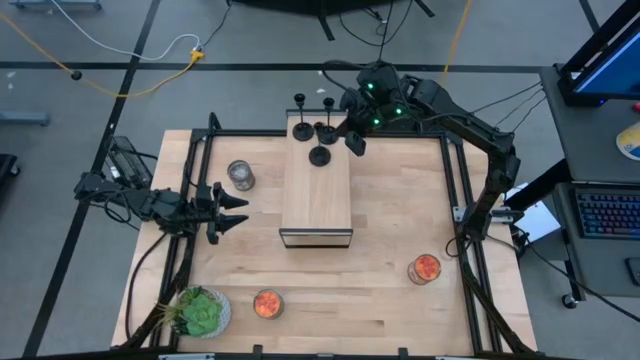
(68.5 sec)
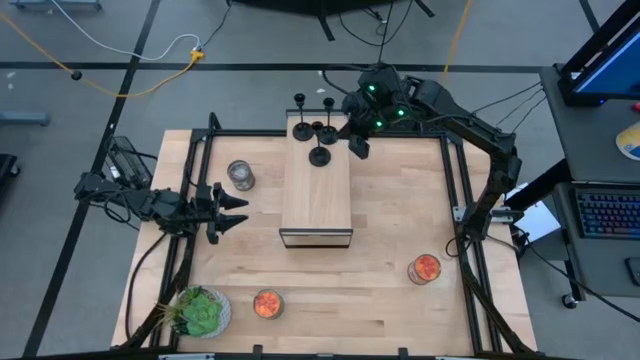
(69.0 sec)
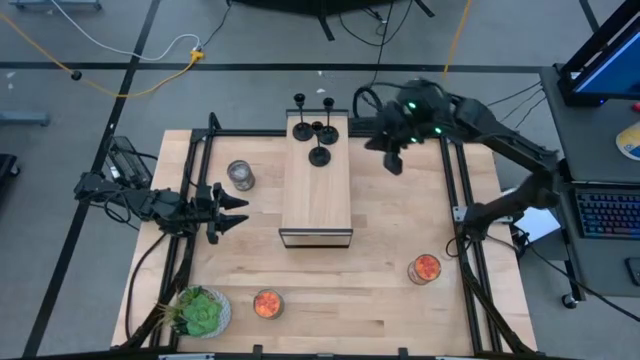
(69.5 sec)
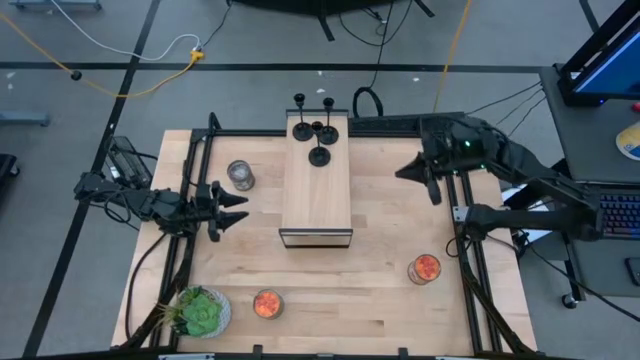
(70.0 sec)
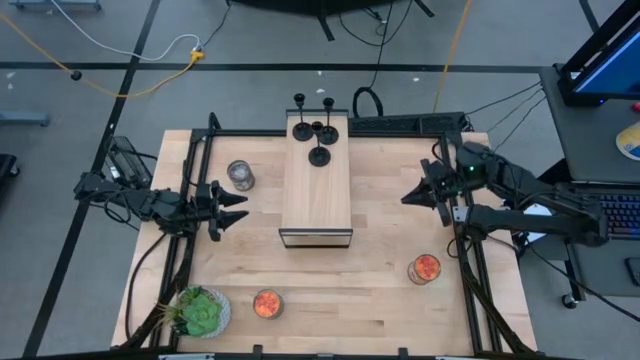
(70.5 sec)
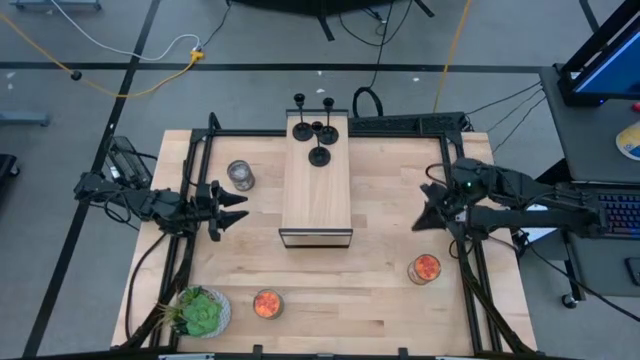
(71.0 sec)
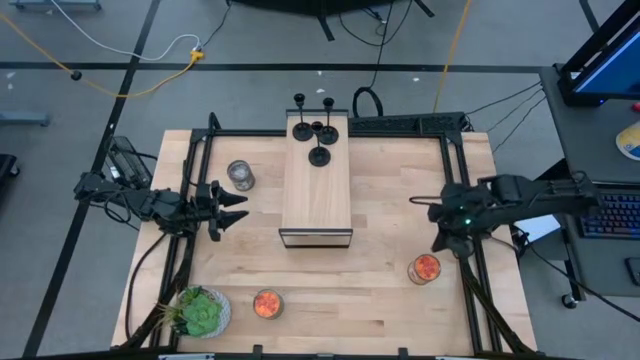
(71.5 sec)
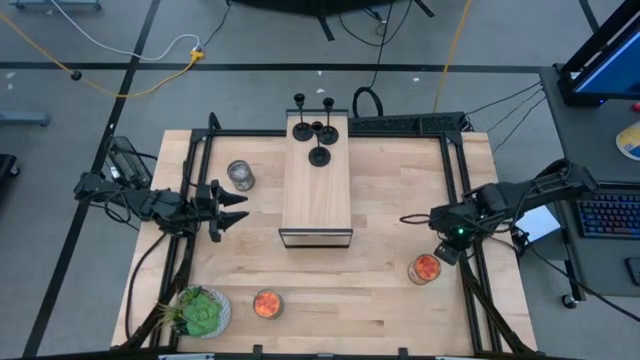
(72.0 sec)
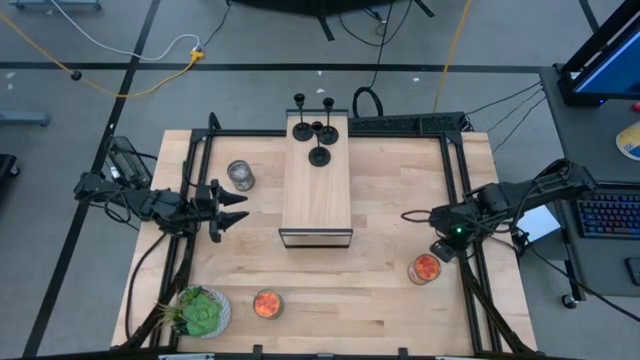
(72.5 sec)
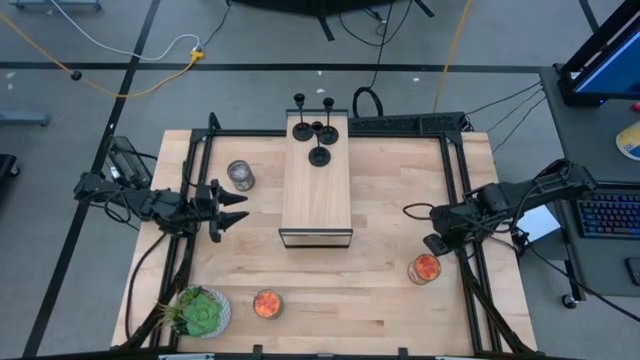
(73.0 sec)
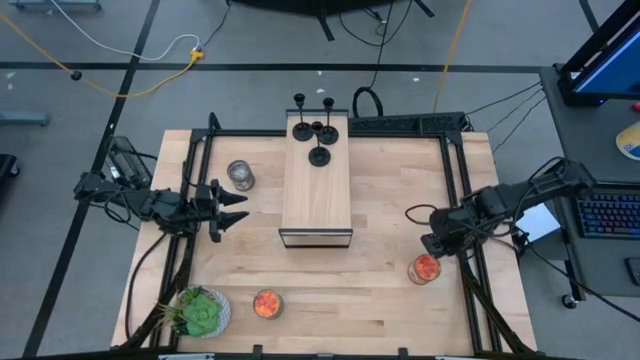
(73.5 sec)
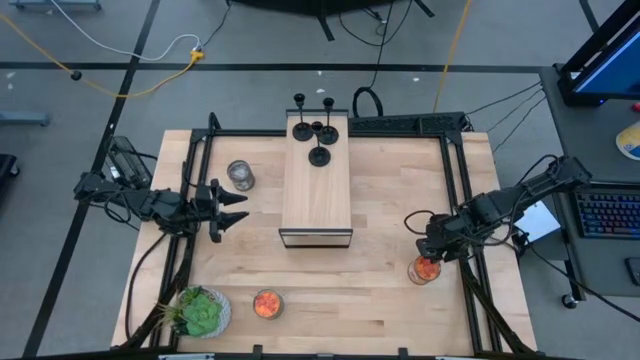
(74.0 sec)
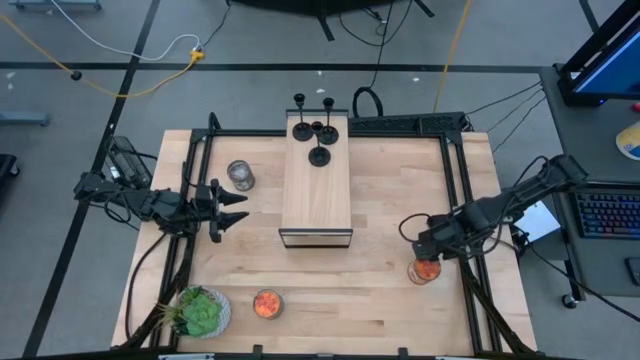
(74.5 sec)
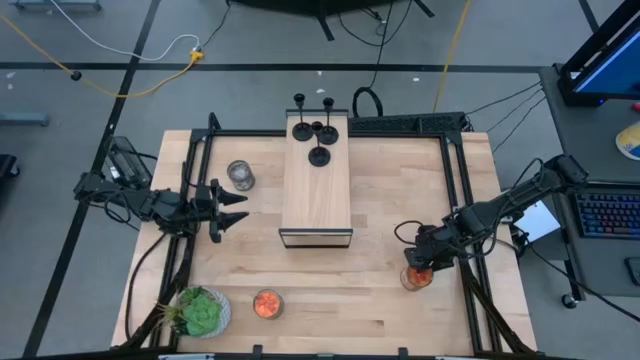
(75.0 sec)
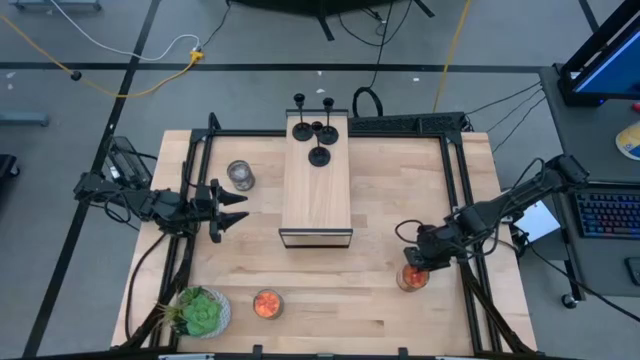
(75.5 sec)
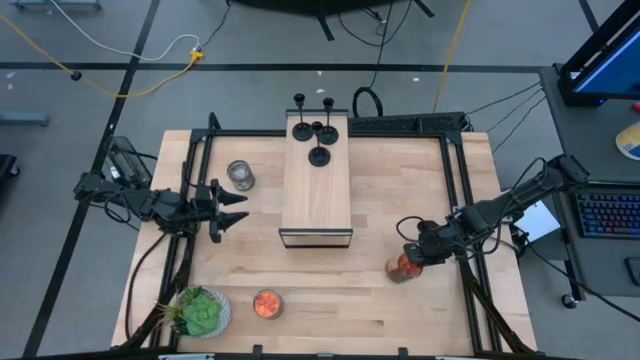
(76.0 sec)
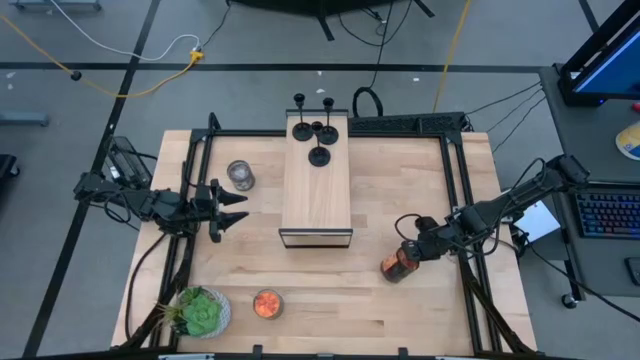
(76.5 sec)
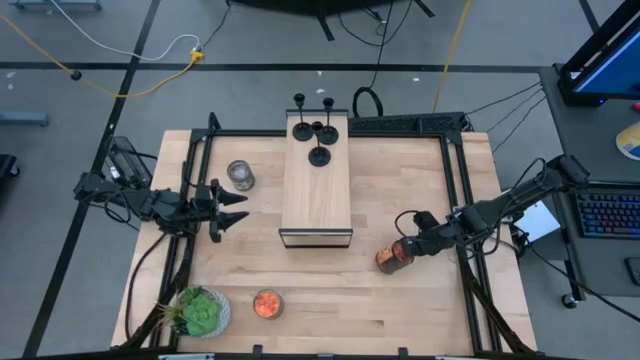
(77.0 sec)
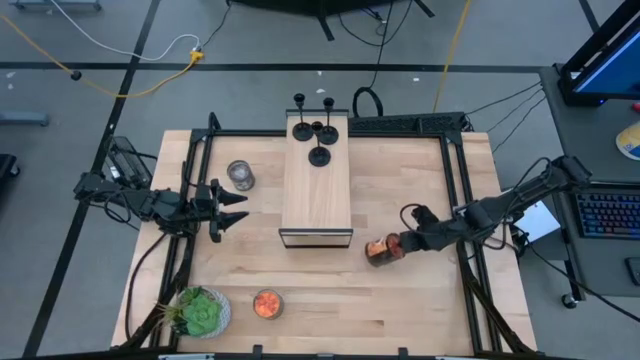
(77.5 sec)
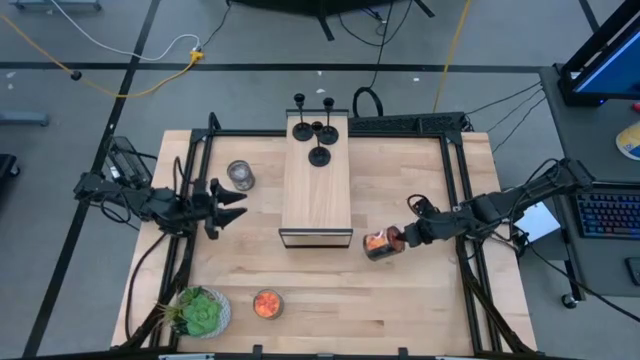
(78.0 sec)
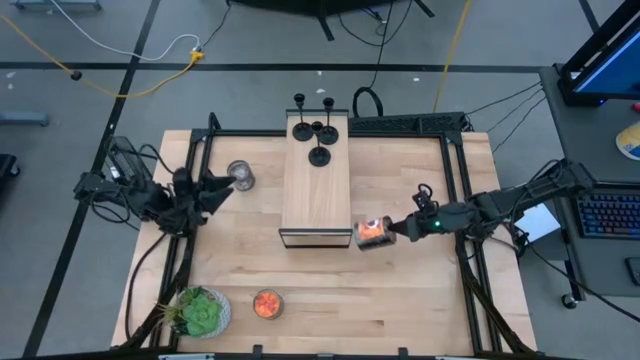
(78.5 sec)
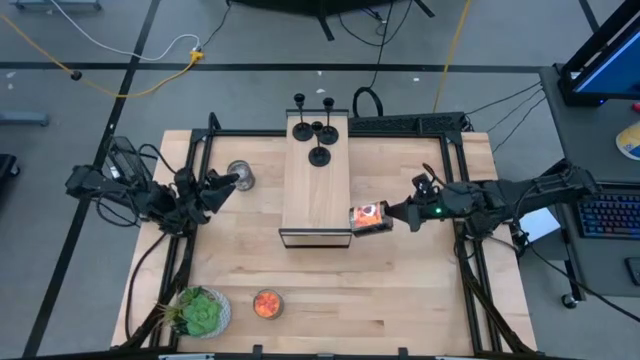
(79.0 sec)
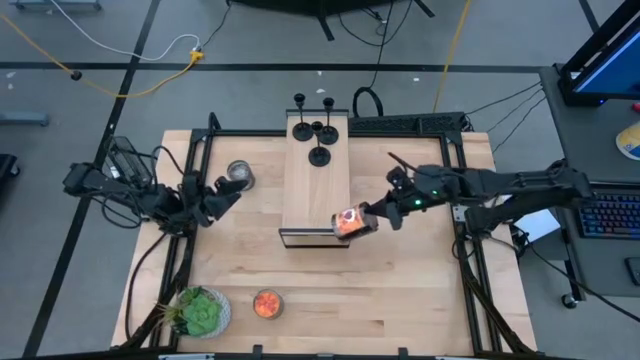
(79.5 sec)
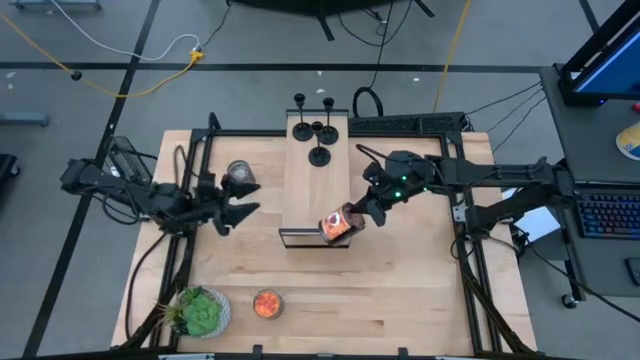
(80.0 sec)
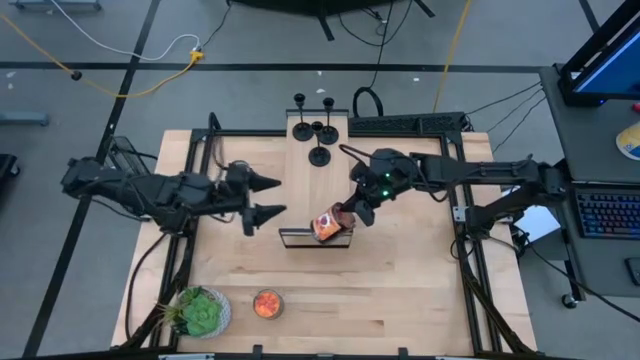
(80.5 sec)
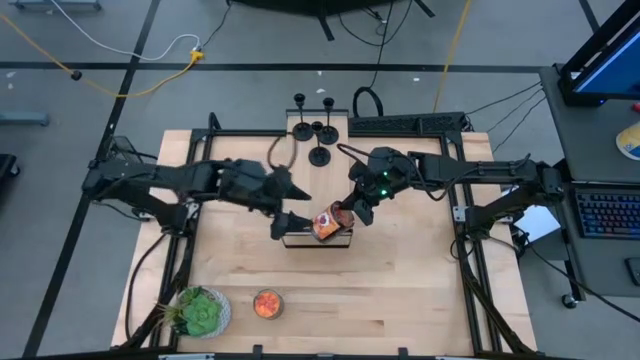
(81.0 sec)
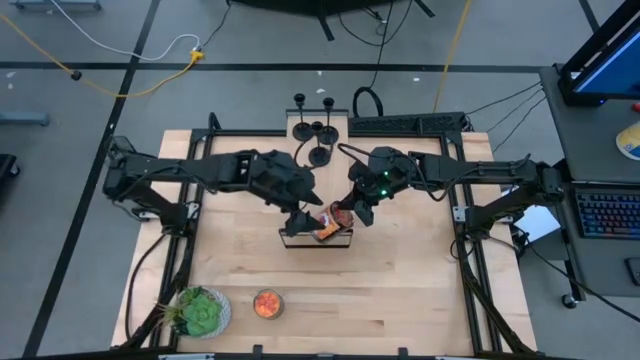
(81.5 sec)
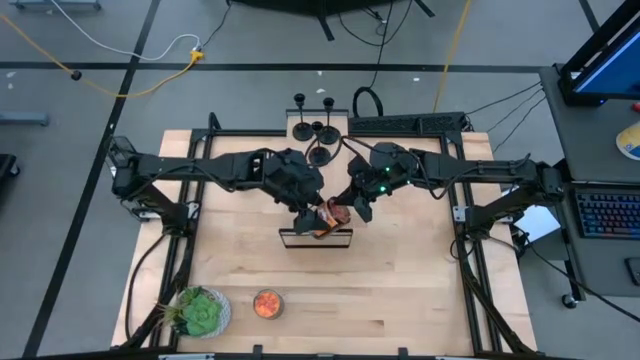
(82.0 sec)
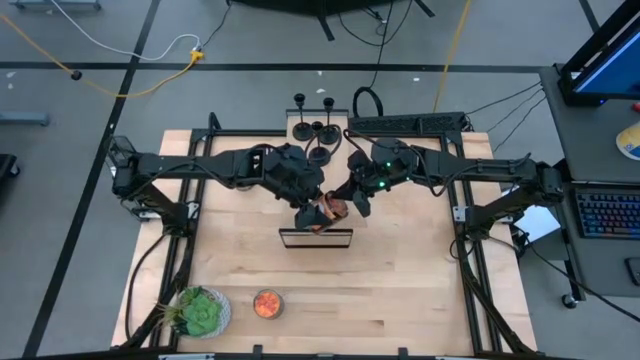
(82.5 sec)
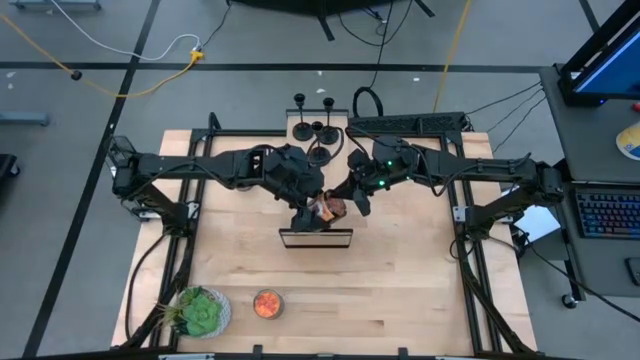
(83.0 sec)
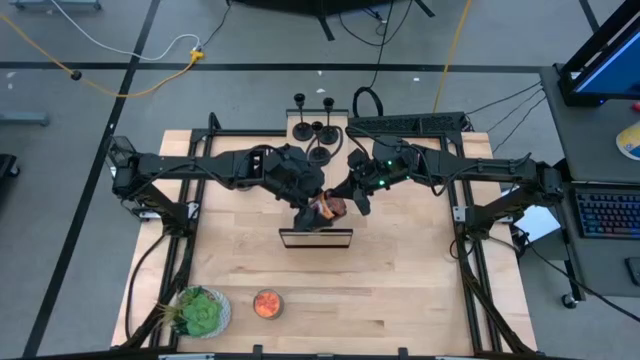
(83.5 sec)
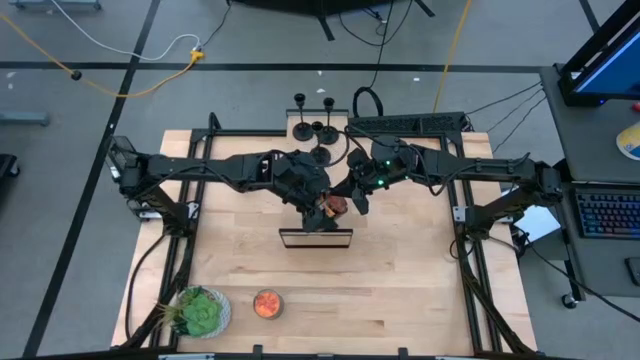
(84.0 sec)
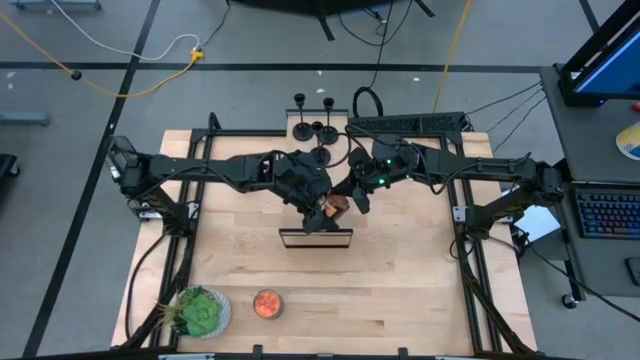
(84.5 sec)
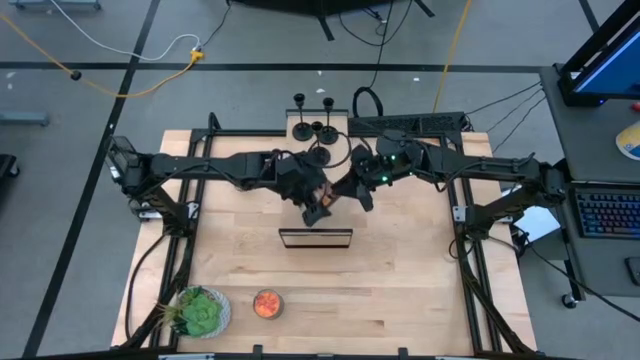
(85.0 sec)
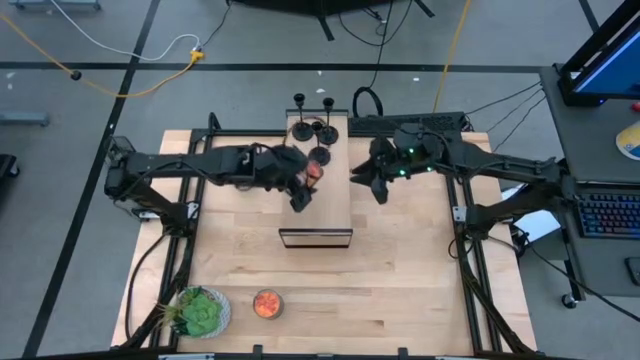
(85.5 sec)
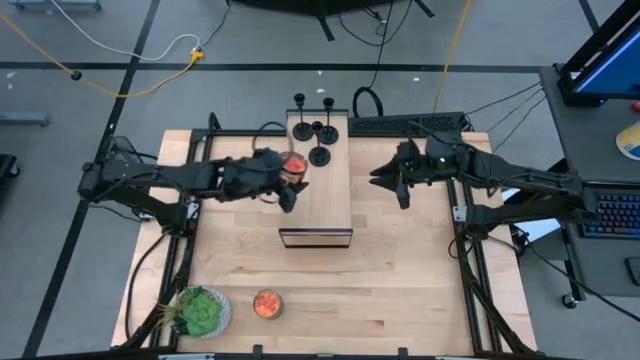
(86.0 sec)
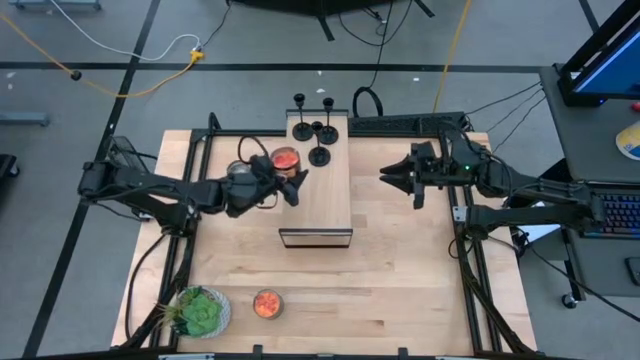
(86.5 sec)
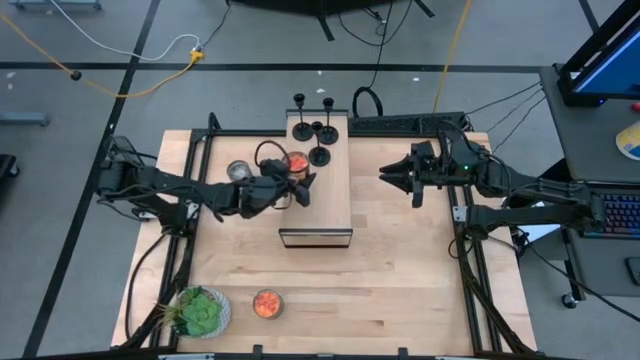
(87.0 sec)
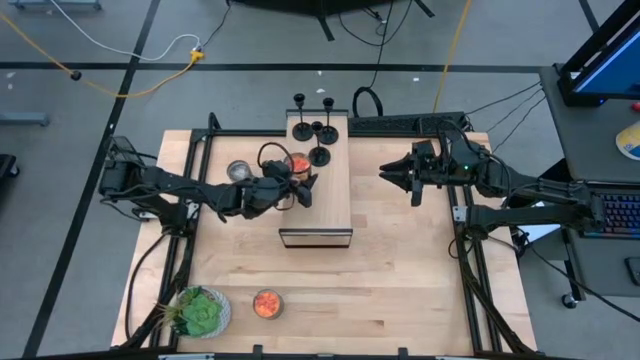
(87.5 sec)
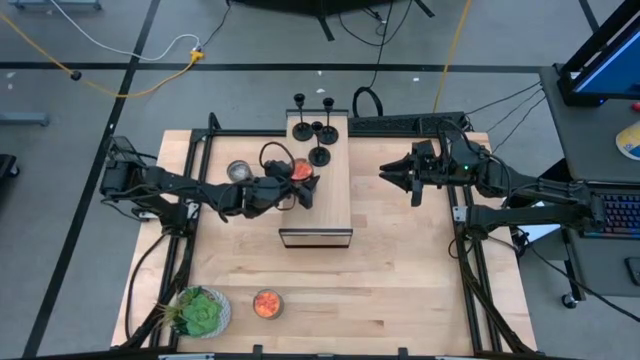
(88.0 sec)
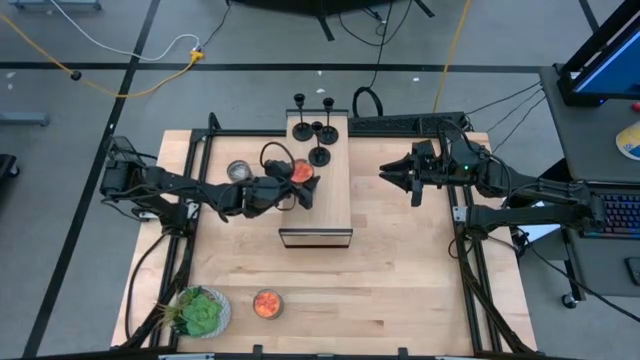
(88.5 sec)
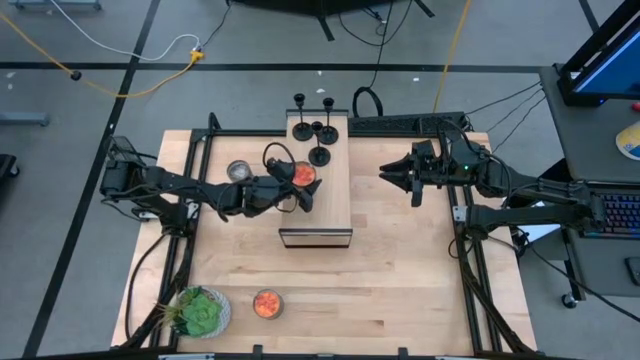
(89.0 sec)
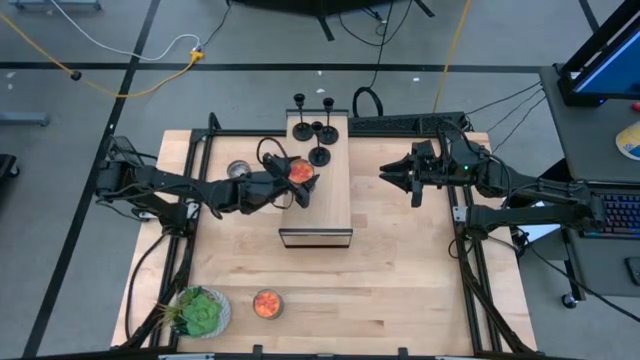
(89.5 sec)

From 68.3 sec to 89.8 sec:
Task: Pick & Place candle stick holders
Put the right orange scented candle on the shelf

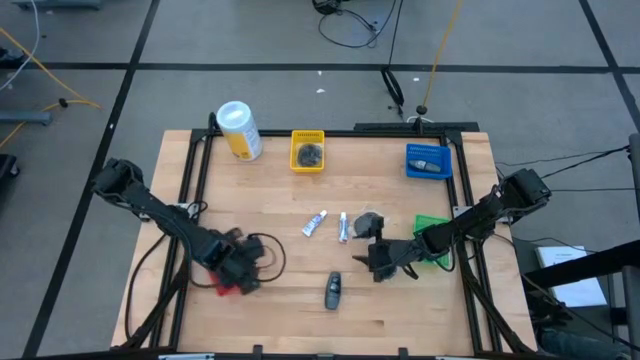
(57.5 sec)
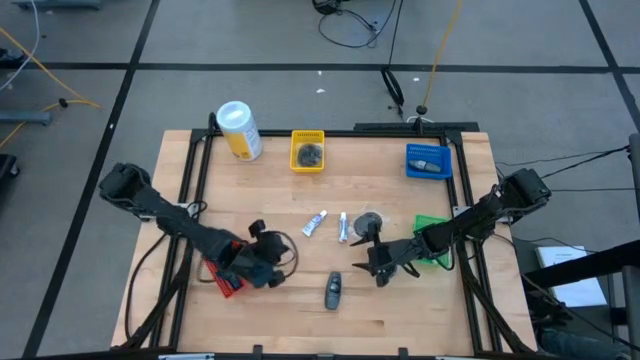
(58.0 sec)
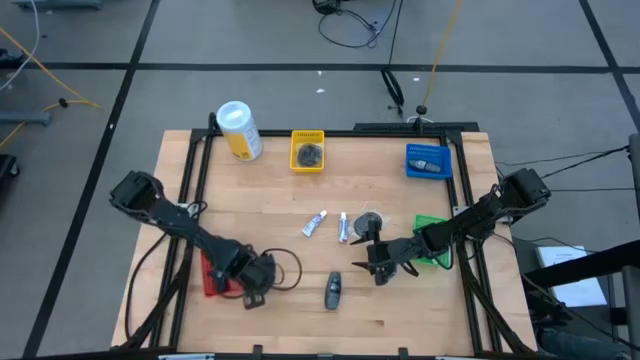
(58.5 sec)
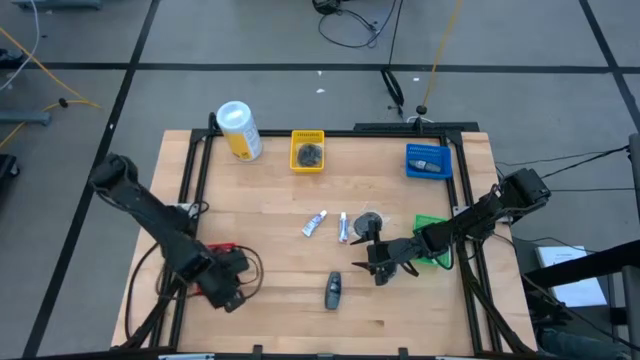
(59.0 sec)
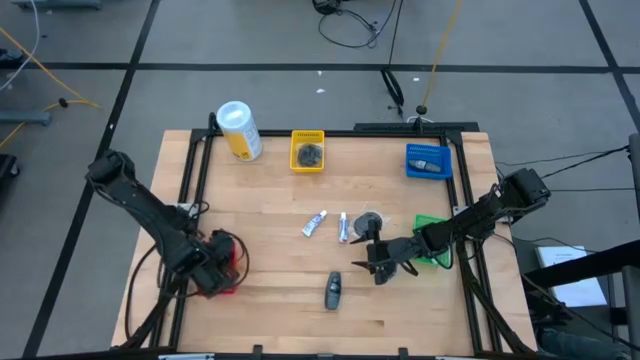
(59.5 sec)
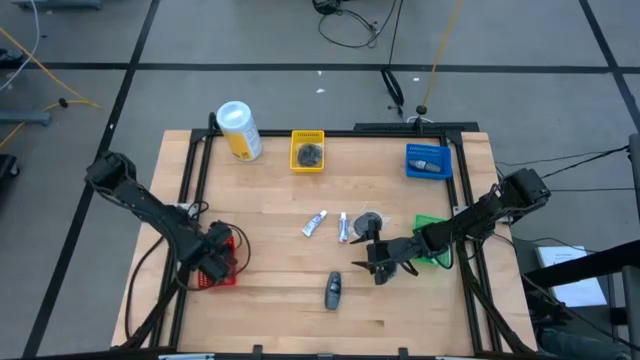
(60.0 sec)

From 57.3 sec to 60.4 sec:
Task: Pick & Place Travel size toiletries
Adjust the red bin on the table
